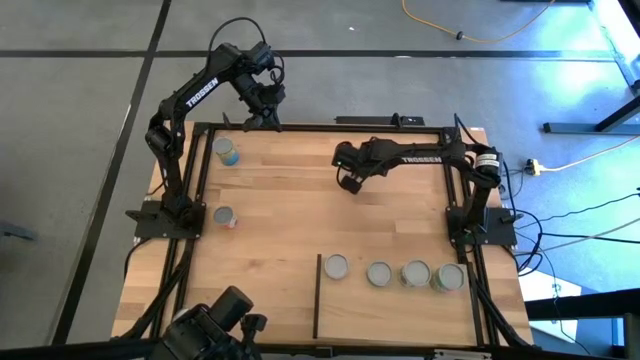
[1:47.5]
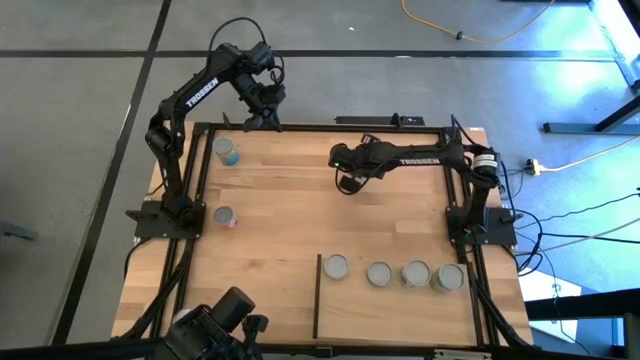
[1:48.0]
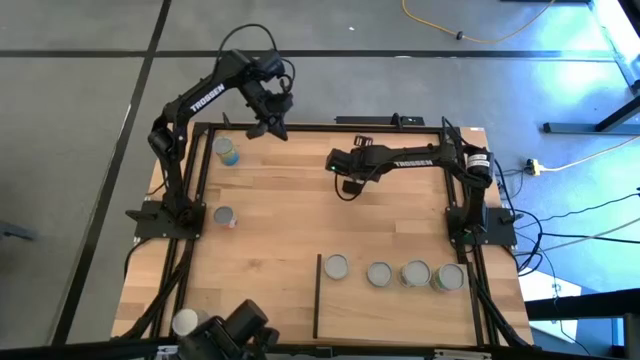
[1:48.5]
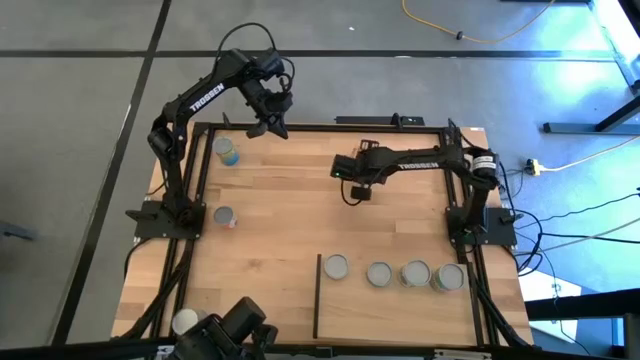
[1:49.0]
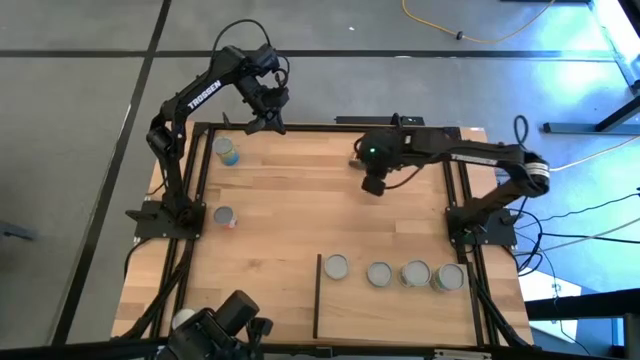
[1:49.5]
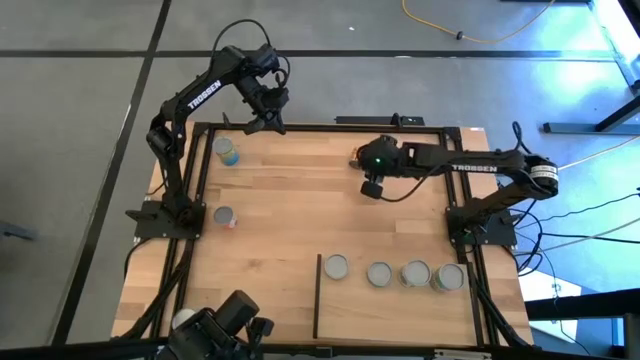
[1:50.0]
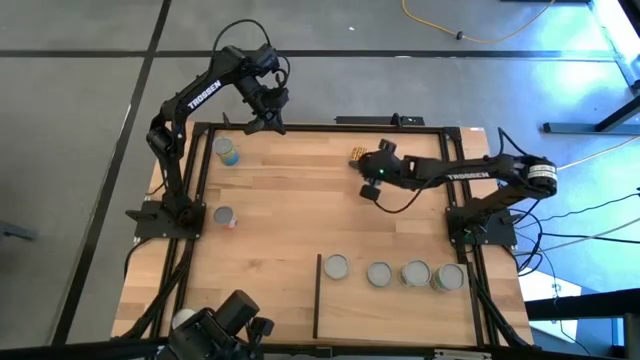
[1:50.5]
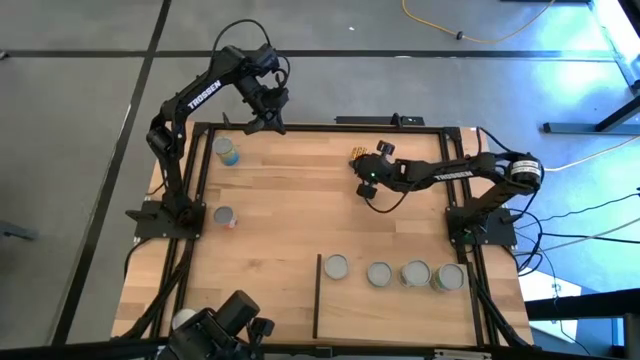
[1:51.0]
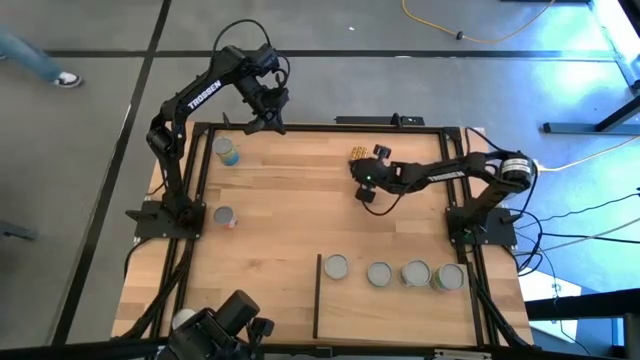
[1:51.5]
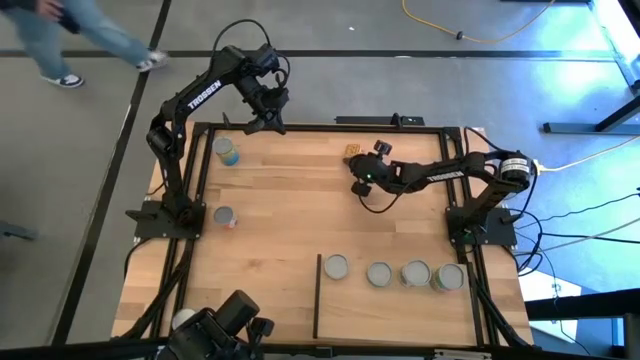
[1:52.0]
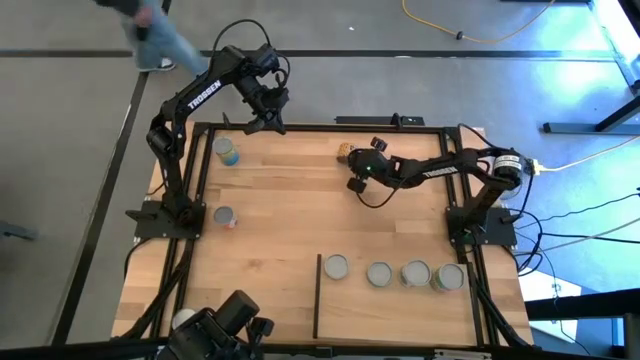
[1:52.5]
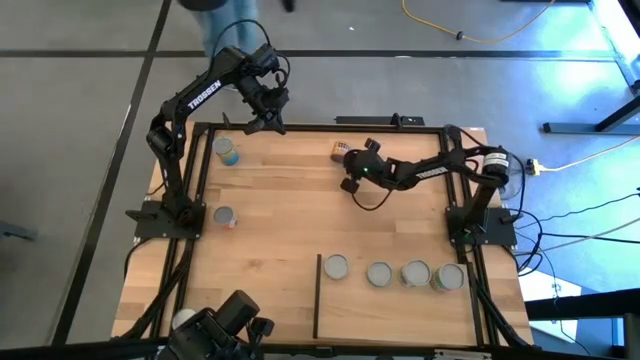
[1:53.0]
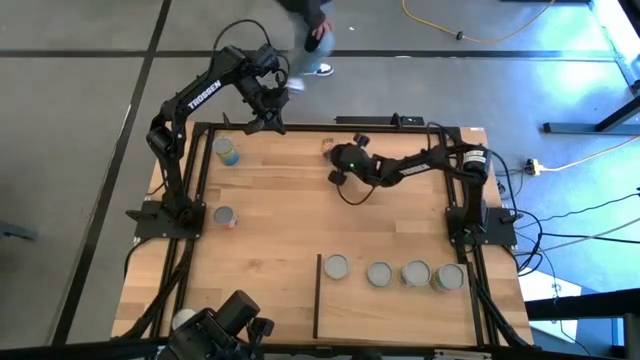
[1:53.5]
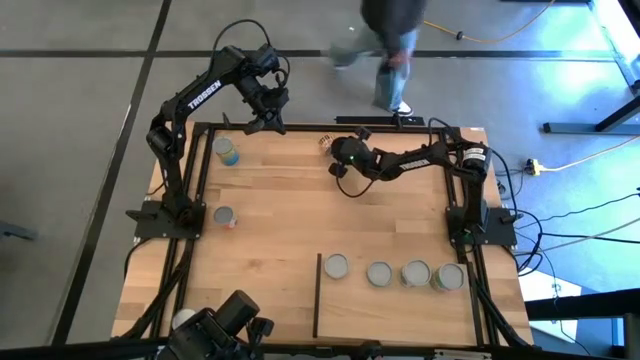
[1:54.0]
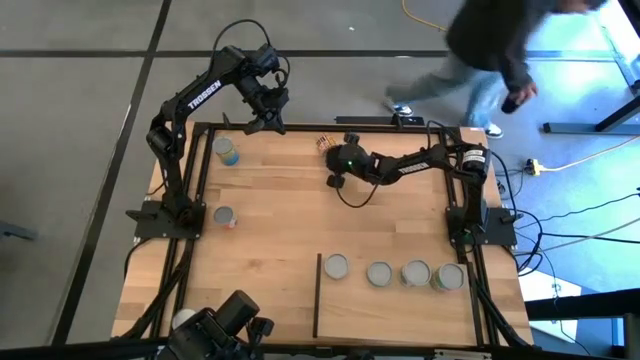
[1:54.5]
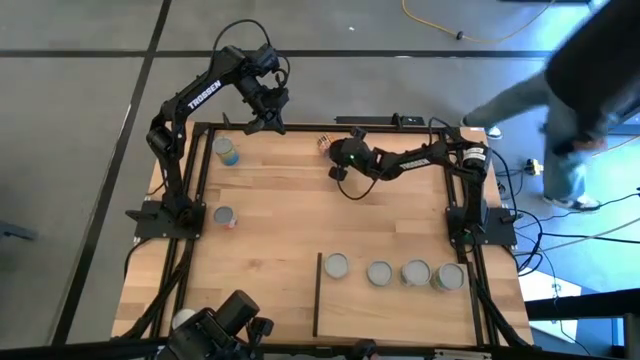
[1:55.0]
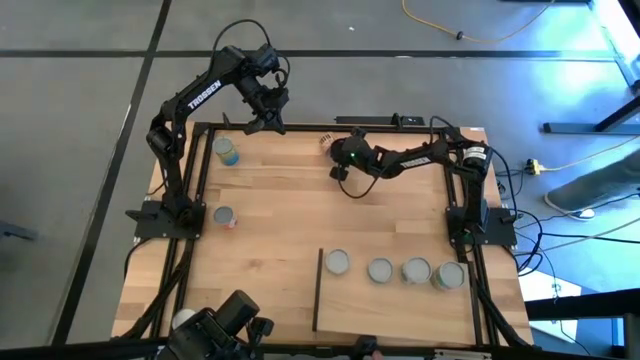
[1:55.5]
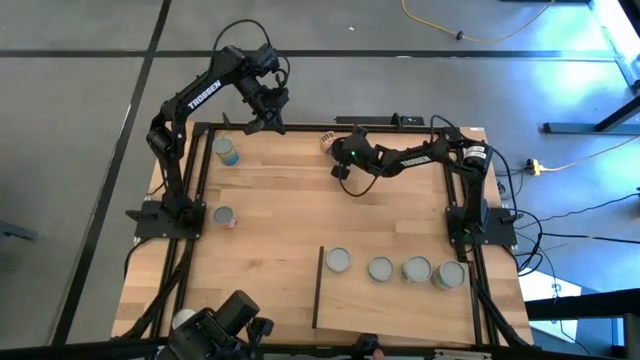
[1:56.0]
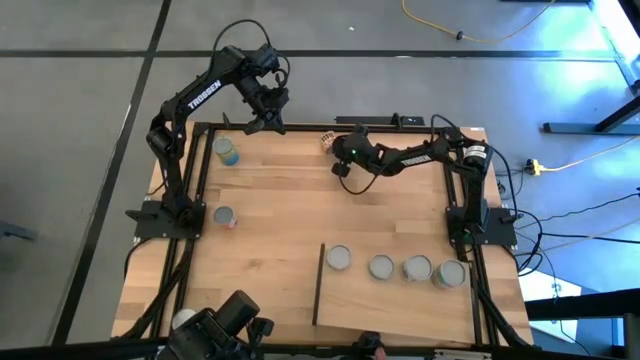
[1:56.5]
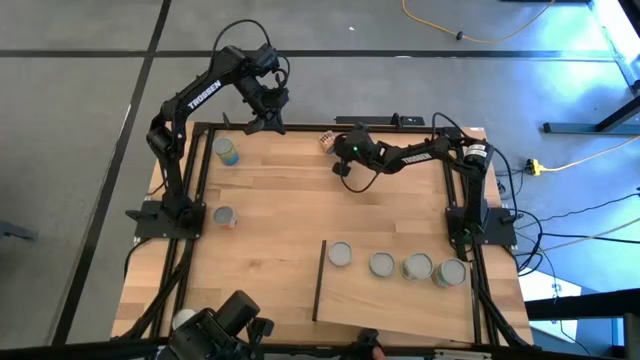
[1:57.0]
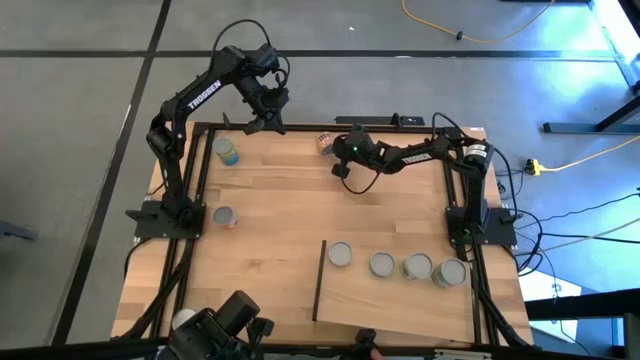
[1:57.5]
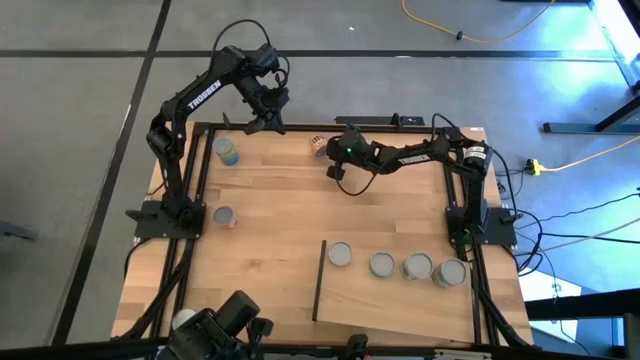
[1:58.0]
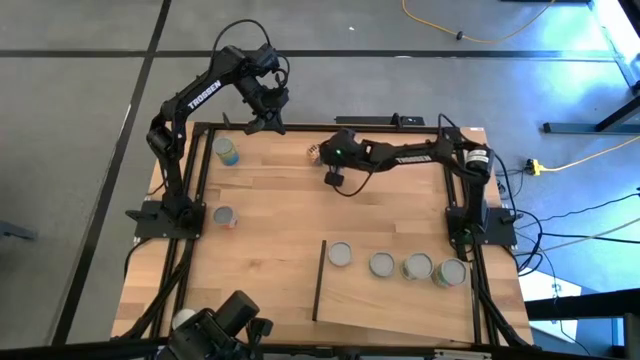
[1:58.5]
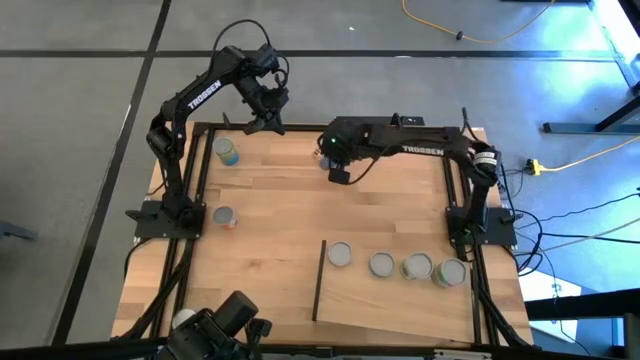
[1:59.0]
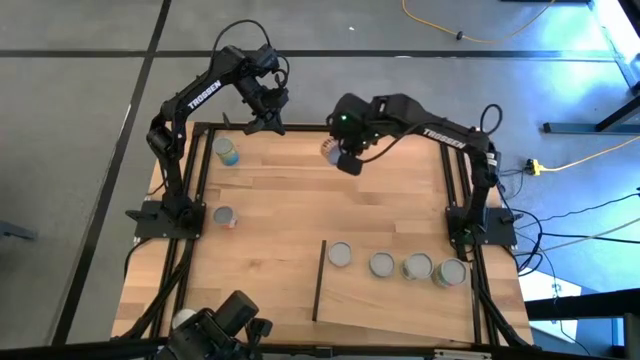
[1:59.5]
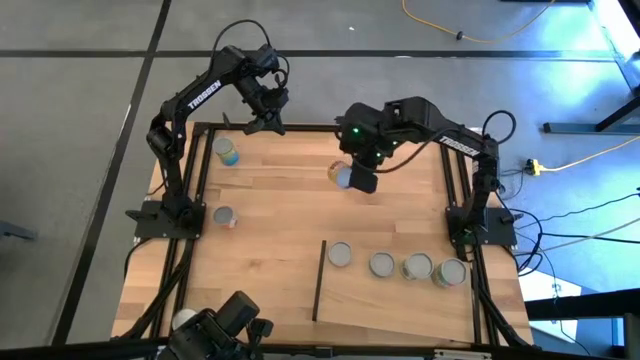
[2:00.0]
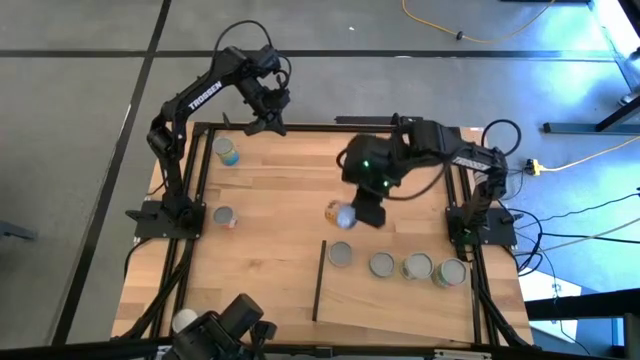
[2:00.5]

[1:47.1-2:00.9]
Task: Pick and place cans onto a shelf
Put the yellow canned black beans on the shelf aligned with the other pink canned chicken soup

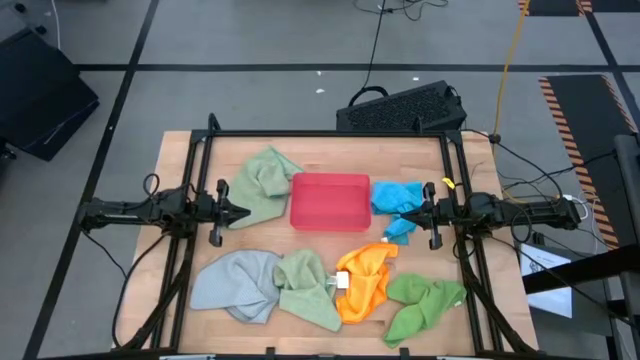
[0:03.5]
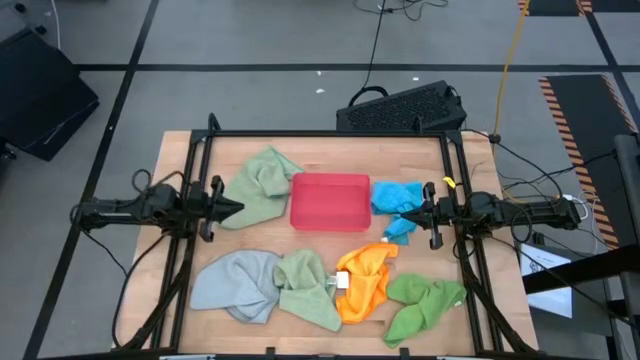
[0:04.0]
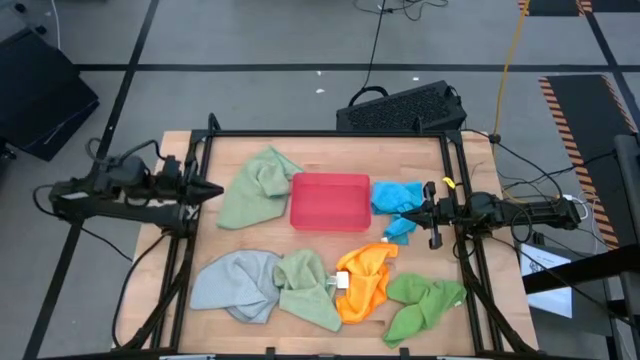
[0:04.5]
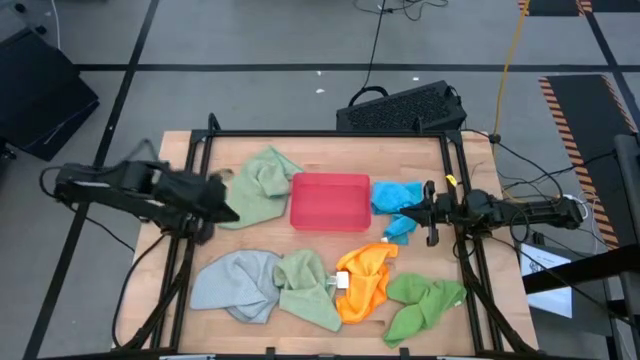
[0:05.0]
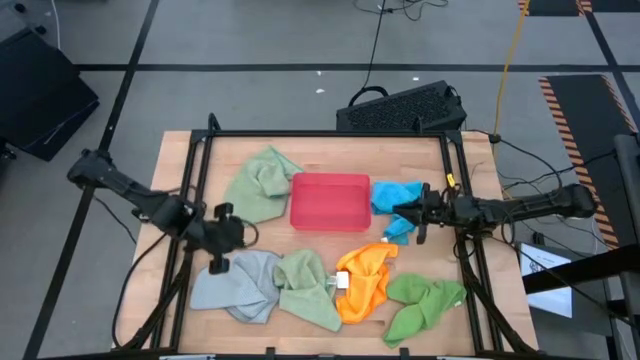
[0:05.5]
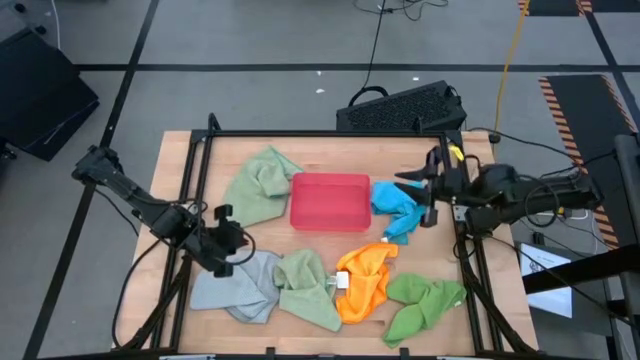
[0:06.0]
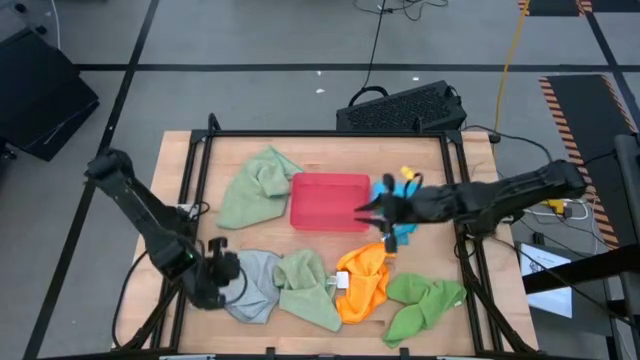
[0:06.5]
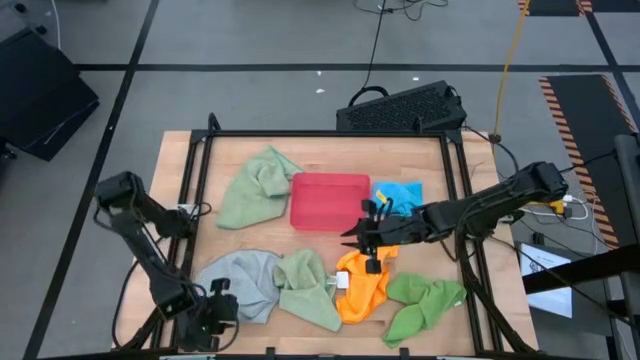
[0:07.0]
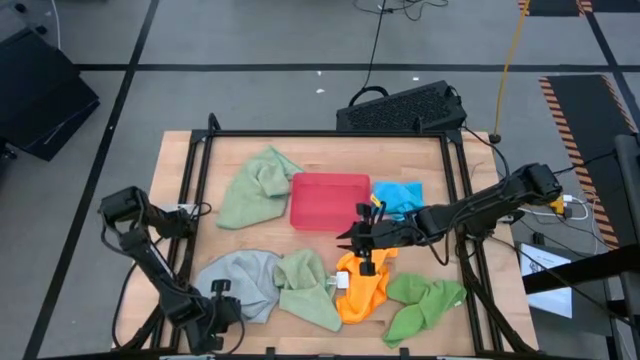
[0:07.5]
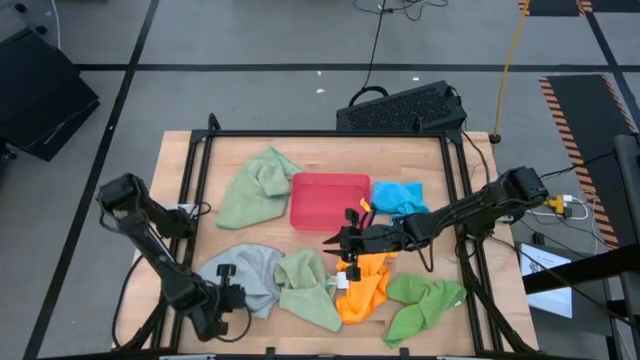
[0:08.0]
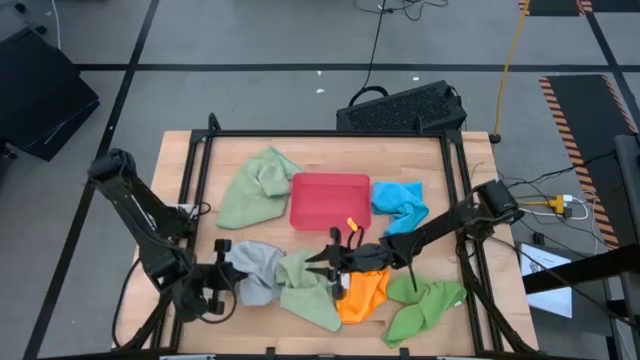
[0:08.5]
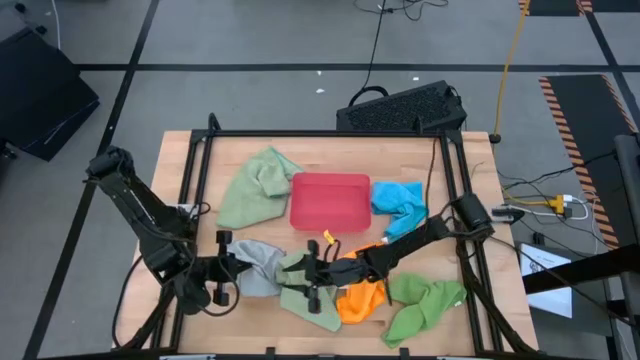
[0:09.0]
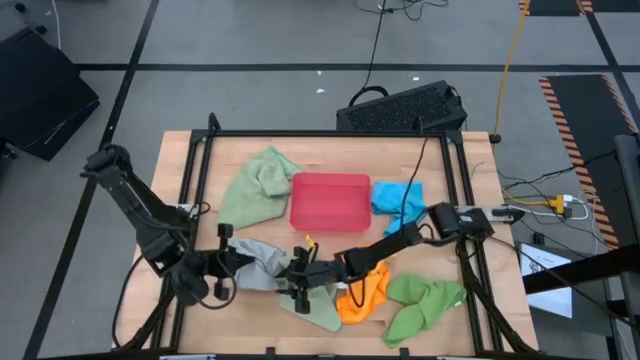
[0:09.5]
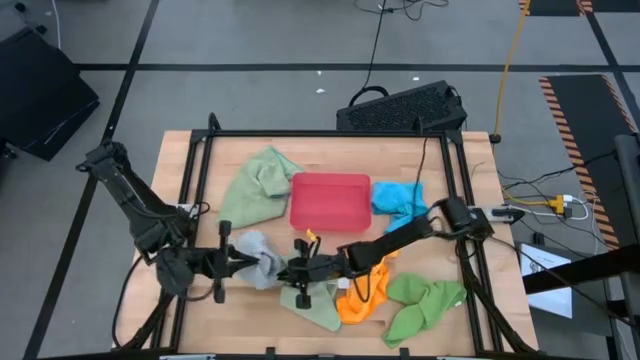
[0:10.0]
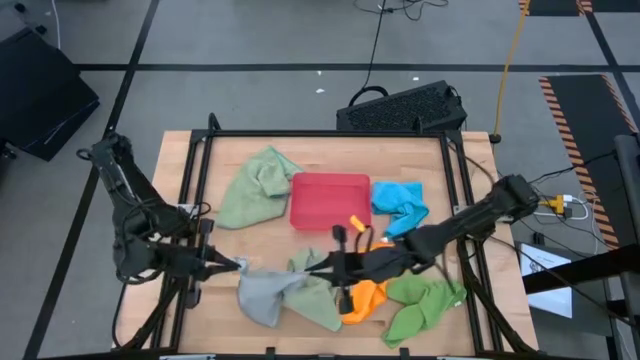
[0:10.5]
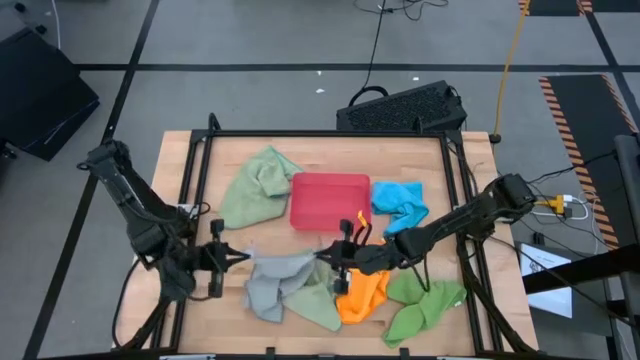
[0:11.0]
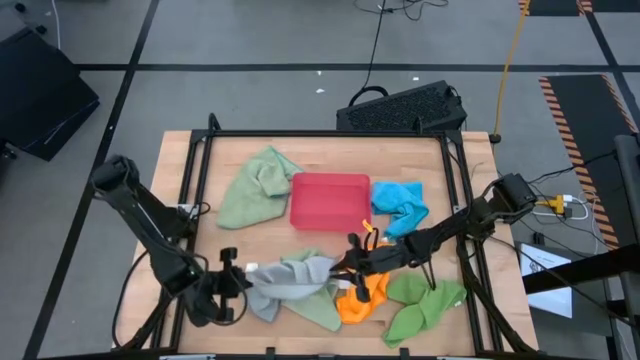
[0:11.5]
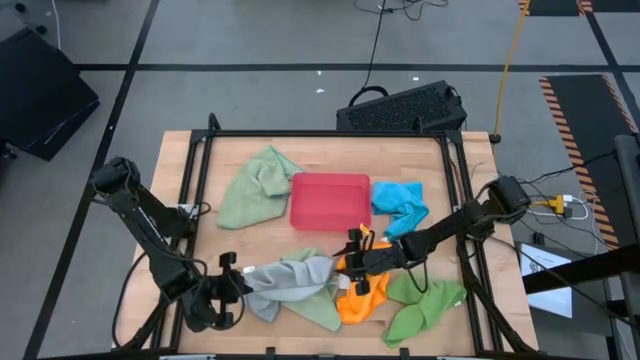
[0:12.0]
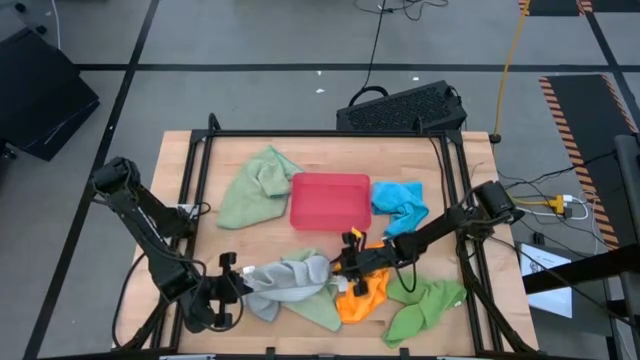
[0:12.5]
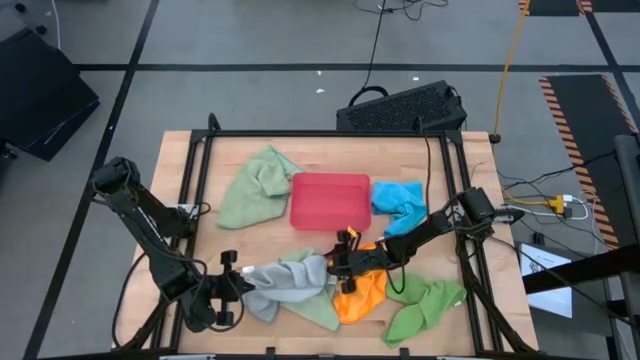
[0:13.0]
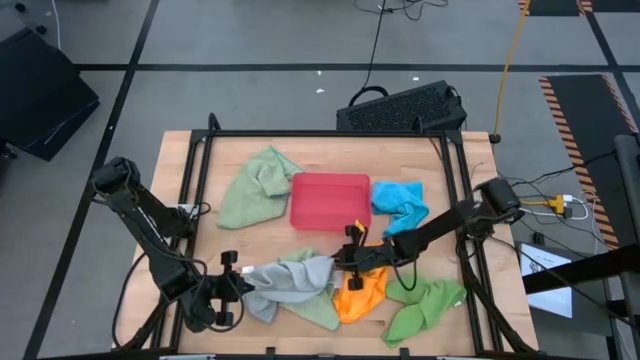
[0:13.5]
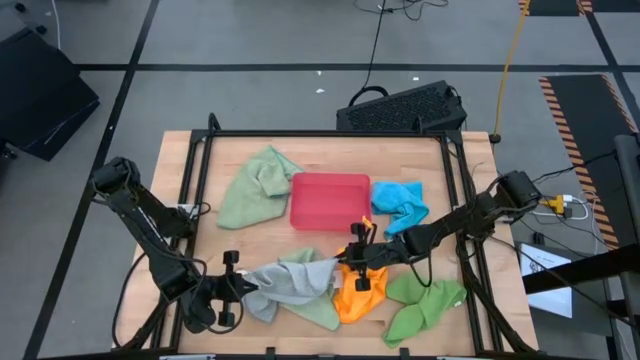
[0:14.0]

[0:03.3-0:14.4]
Task: Fold microfiber towels
Fold the gray microfiber cloth
